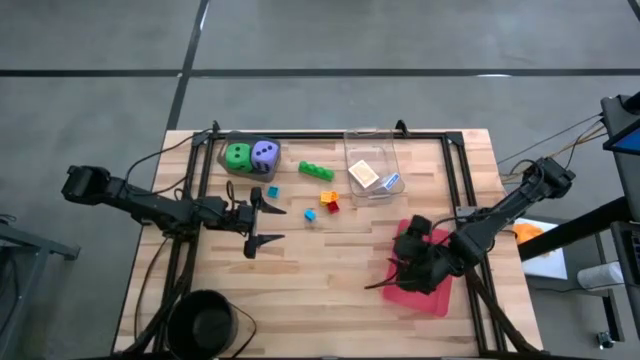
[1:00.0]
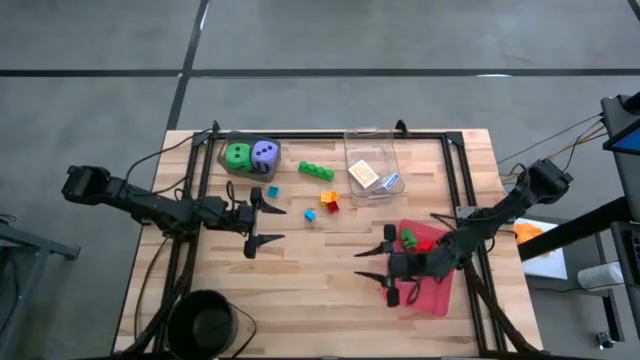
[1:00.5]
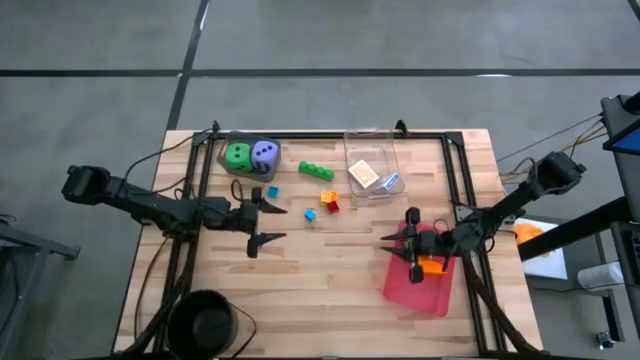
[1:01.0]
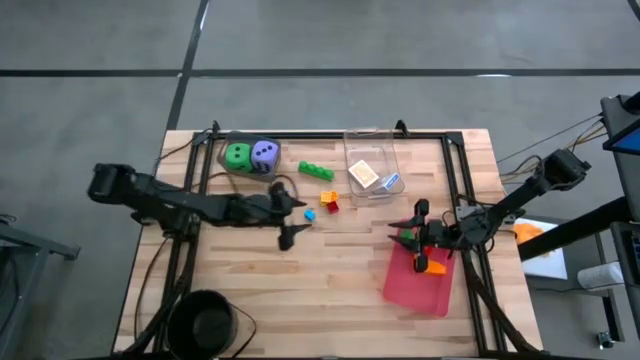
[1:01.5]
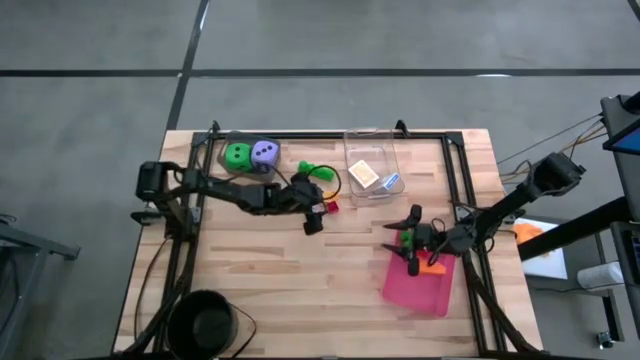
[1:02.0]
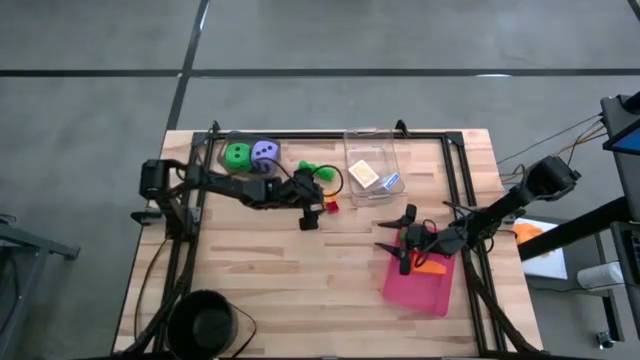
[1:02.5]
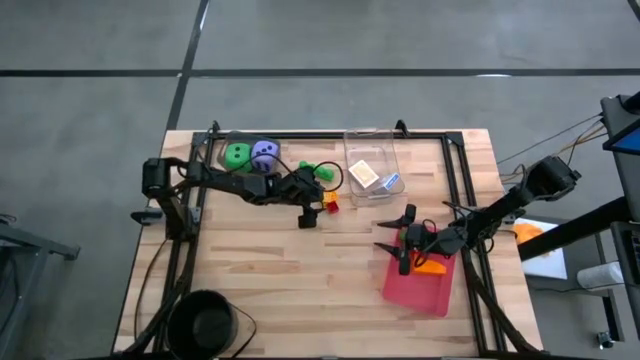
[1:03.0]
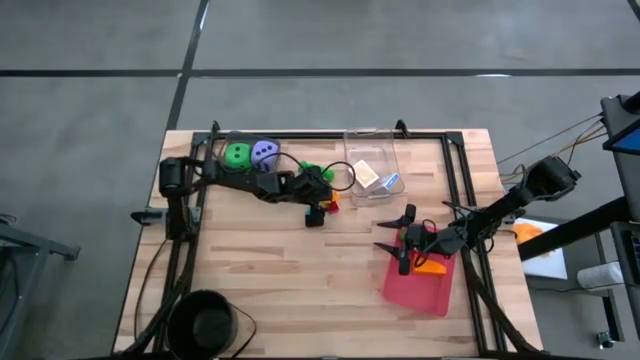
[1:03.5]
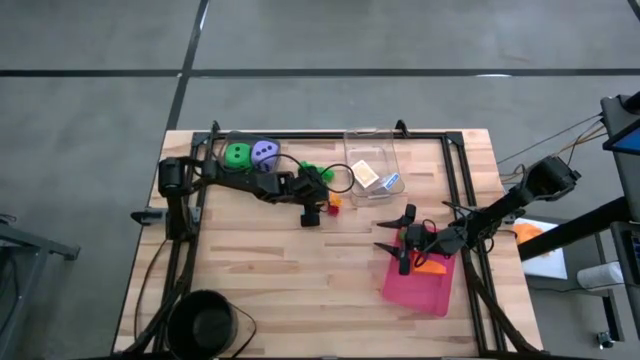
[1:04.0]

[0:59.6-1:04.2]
Task: Pick & Place Toys
Put the light yellow game piece into the pink bin

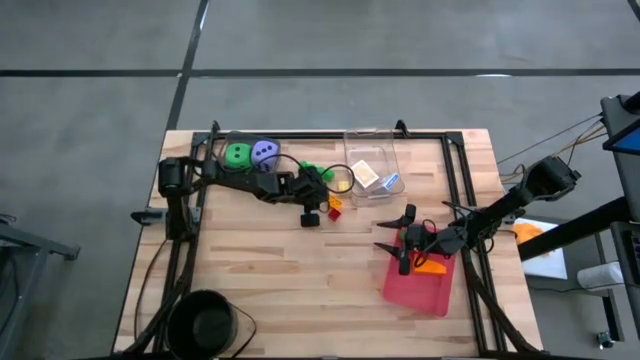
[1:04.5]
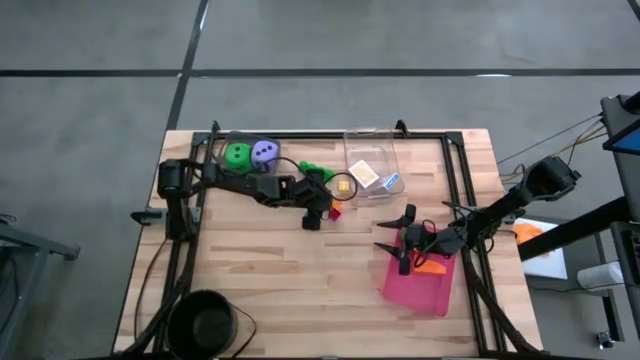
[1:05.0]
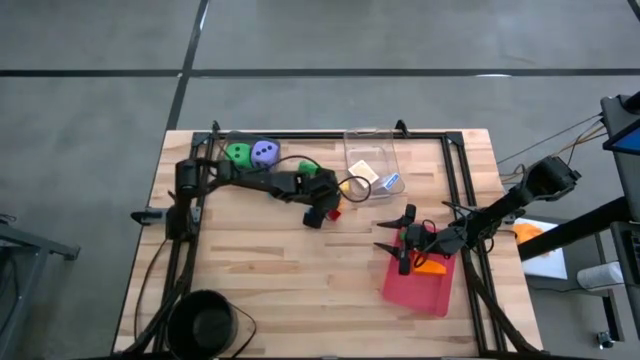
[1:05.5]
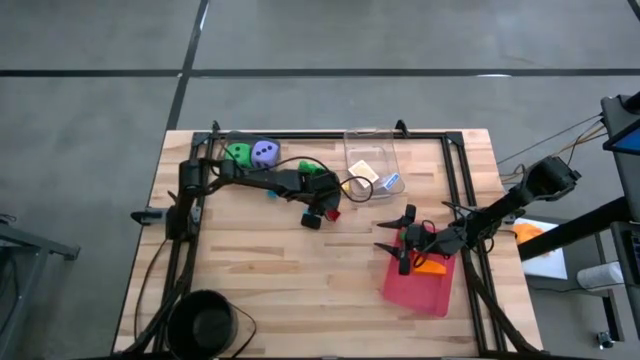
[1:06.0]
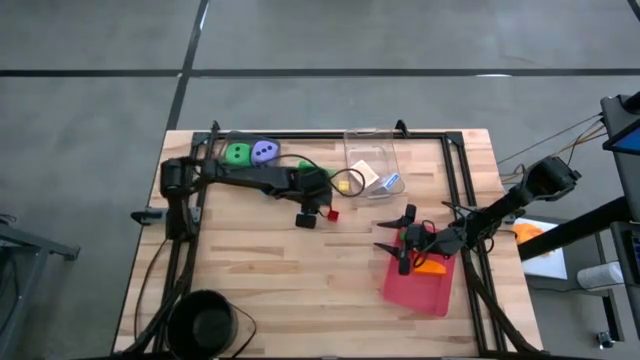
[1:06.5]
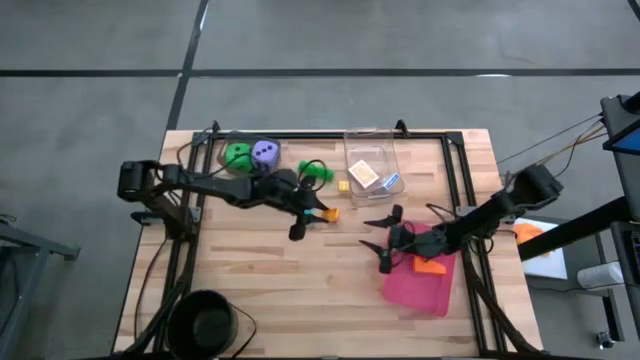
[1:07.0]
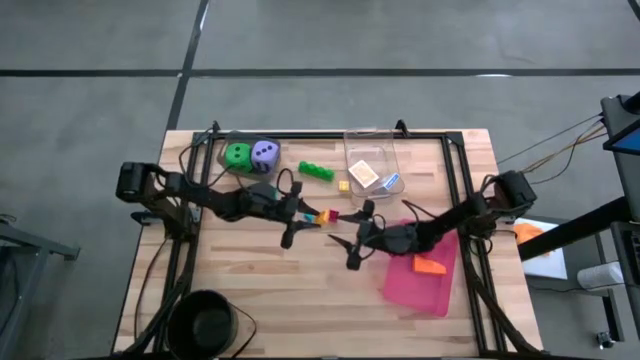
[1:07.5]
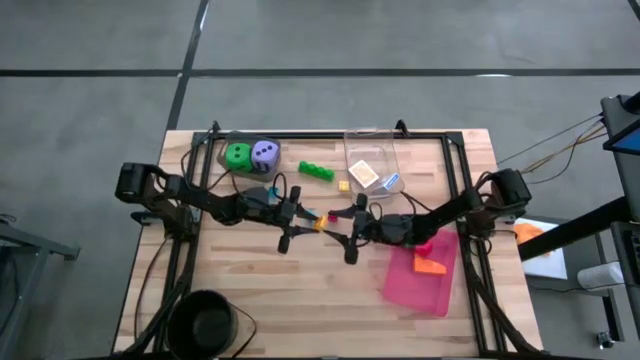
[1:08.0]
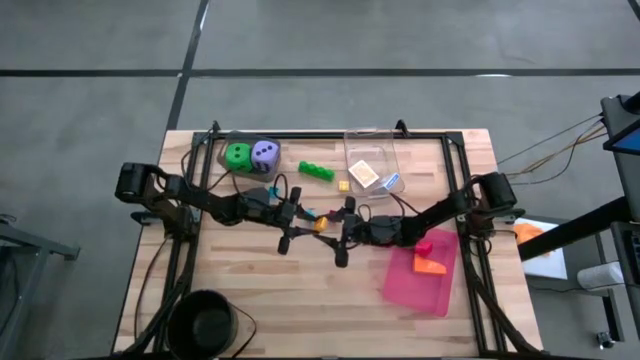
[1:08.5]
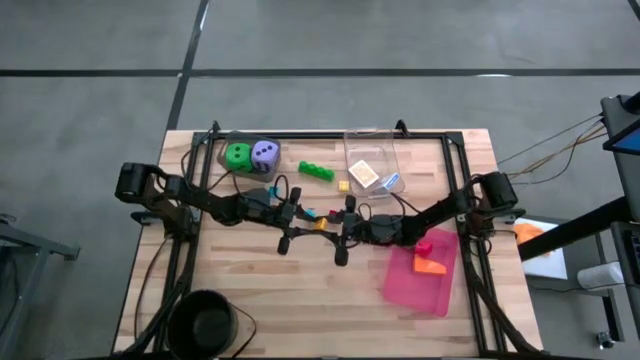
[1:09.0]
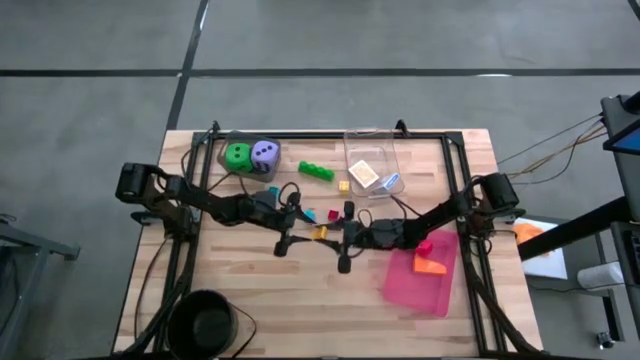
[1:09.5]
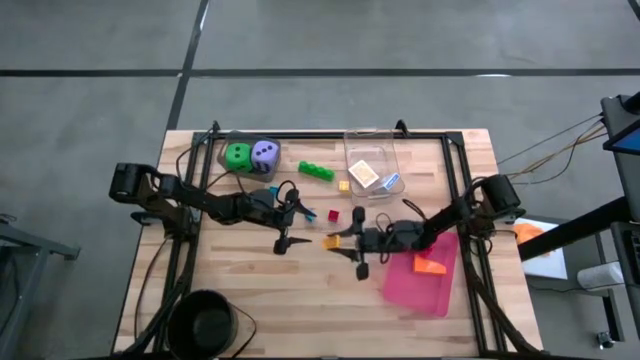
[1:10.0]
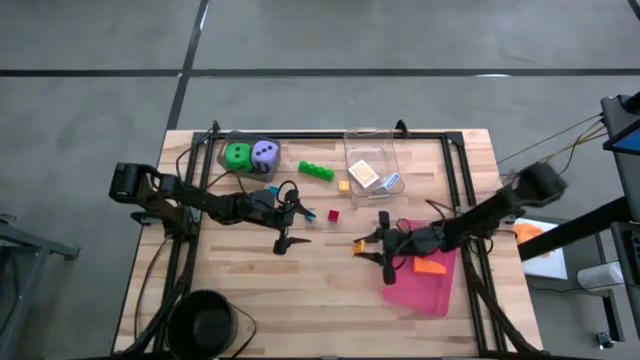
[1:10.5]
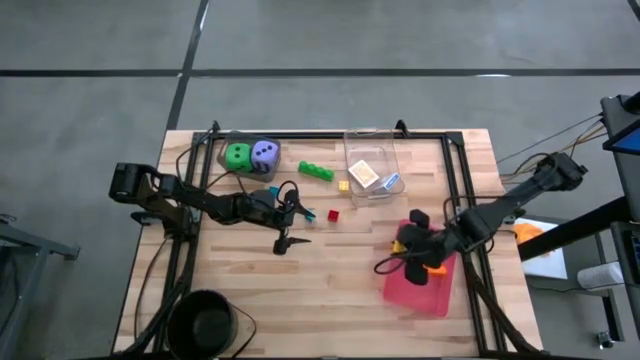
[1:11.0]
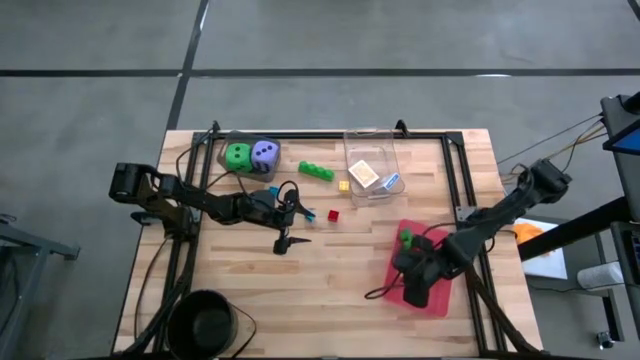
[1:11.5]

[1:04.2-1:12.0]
Put the yellow game piece into the pink bin

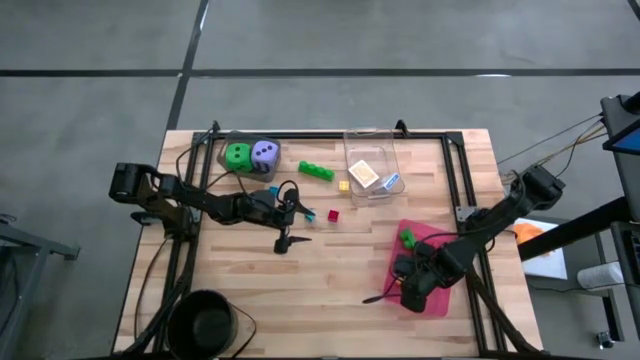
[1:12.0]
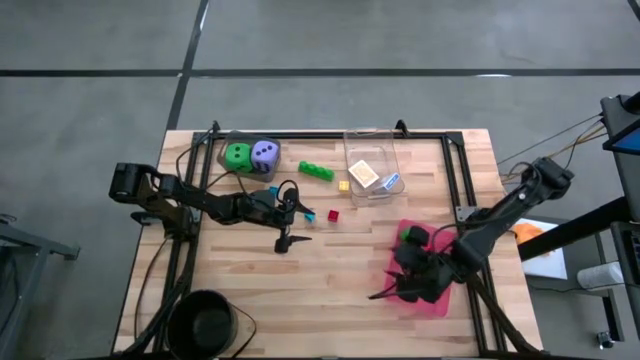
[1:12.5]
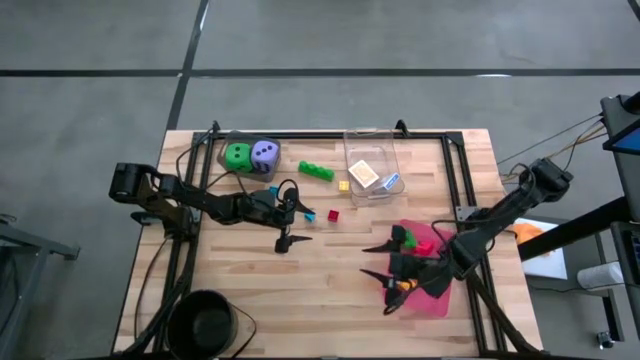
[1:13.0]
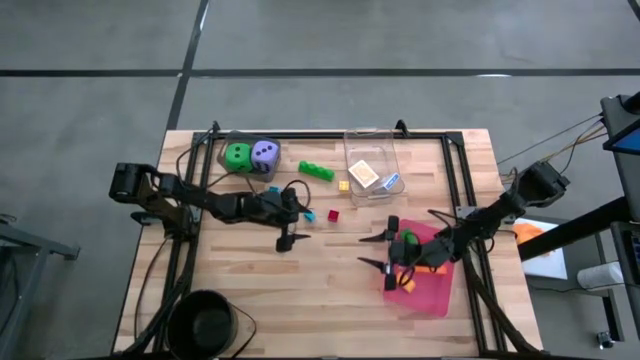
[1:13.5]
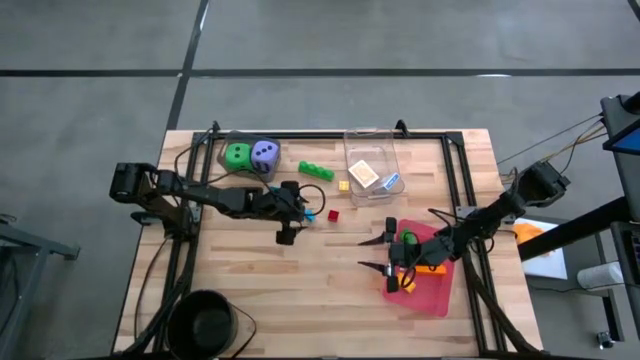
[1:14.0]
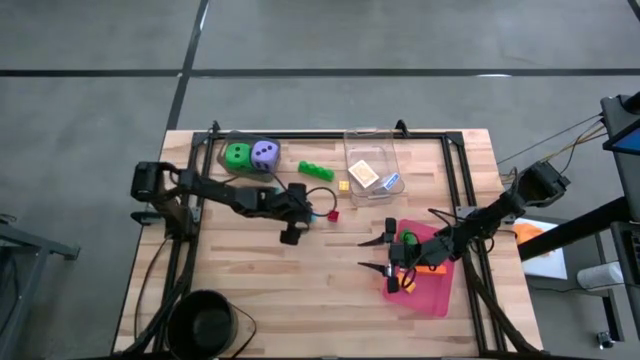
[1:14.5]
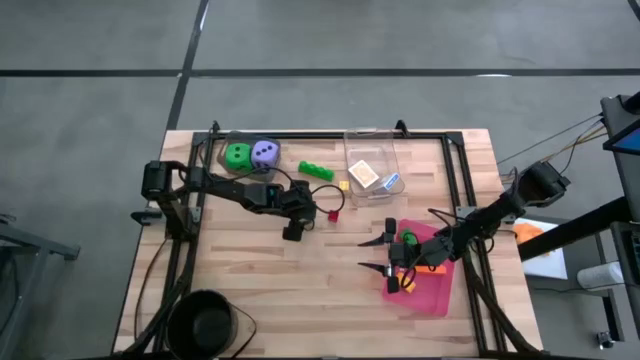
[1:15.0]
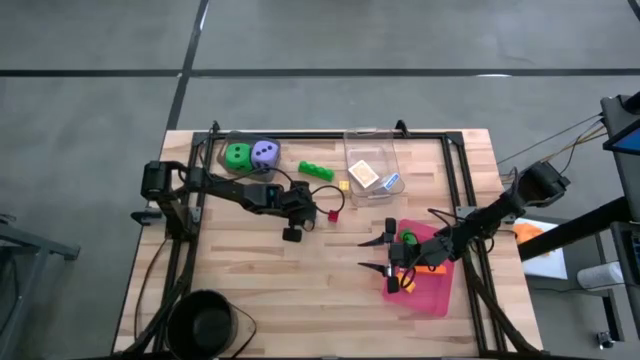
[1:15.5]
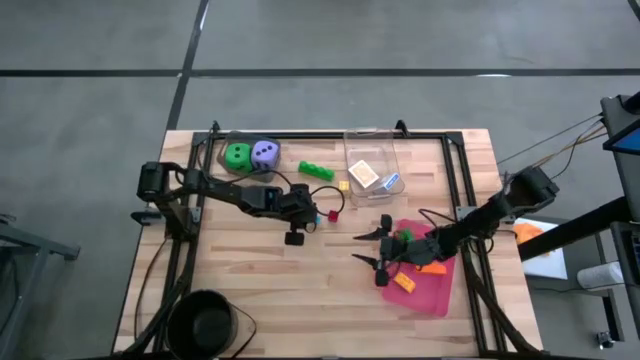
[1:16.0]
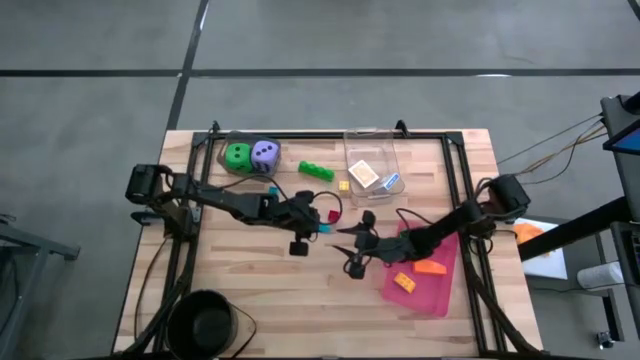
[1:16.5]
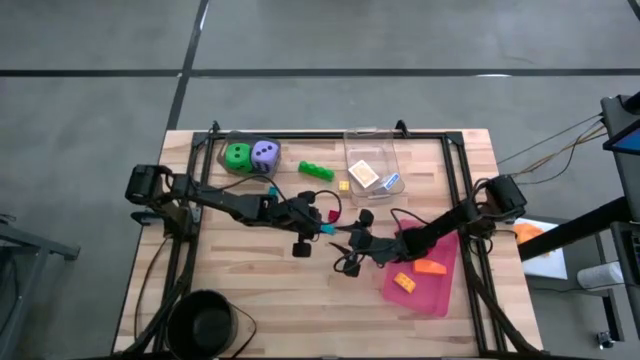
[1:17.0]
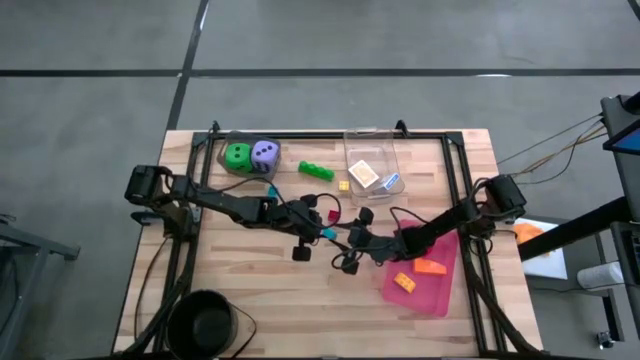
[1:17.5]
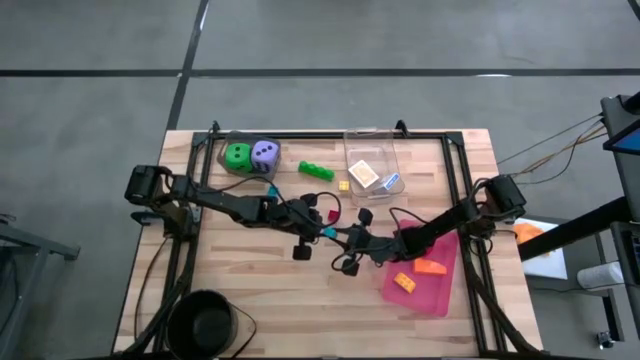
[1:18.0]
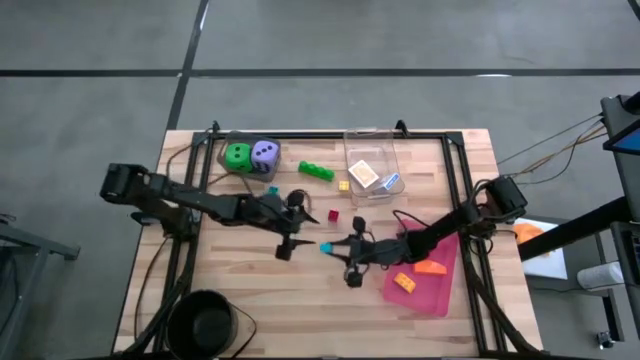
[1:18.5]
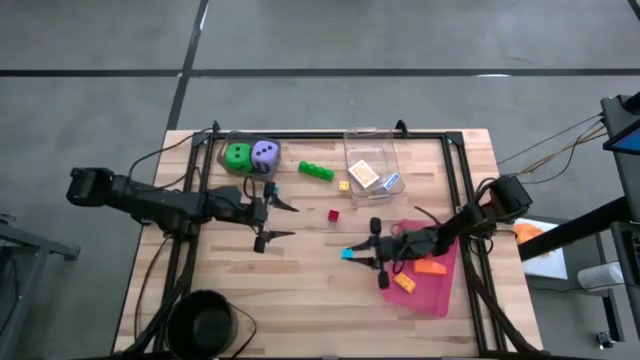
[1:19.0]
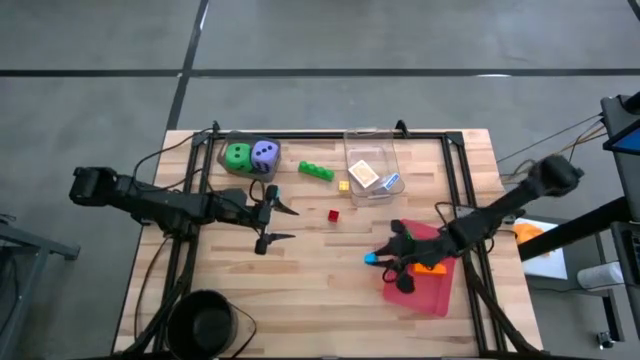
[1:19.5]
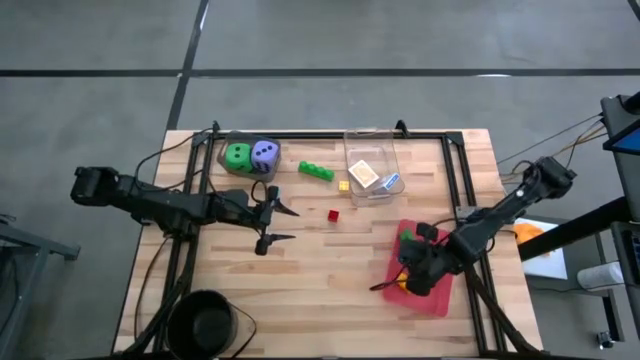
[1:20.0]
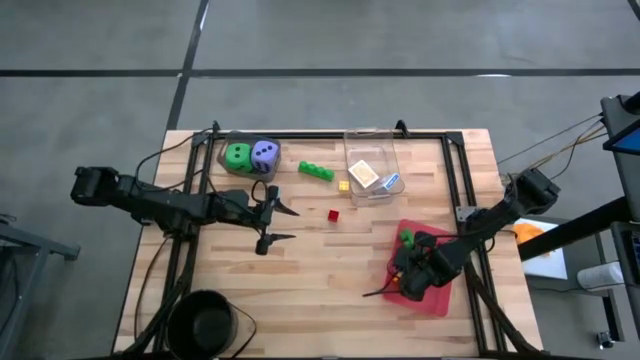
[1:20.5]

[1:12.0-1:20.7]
Put the right blue game piece into the pink bin
